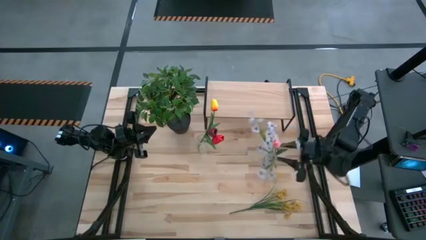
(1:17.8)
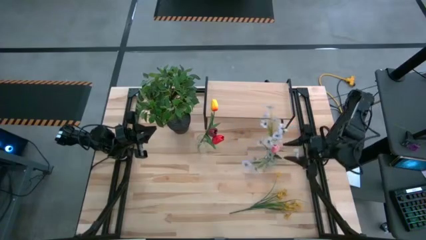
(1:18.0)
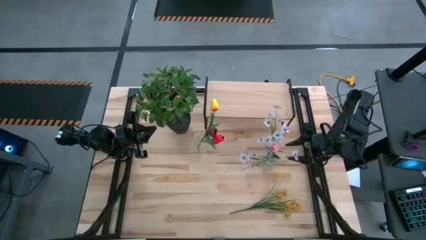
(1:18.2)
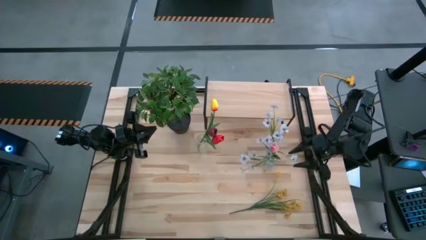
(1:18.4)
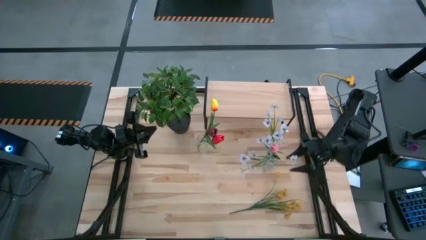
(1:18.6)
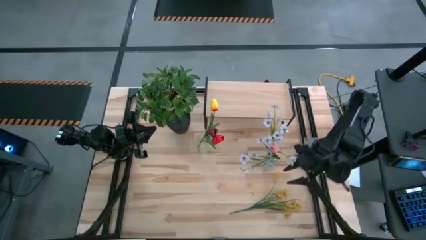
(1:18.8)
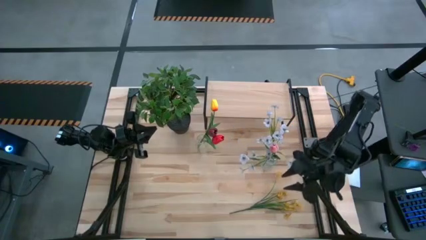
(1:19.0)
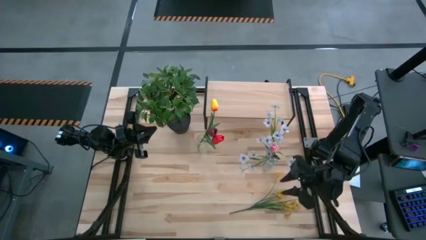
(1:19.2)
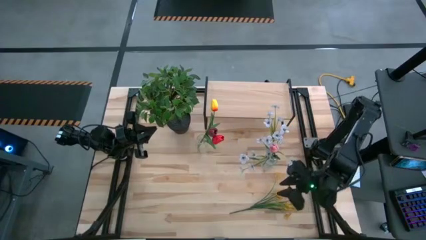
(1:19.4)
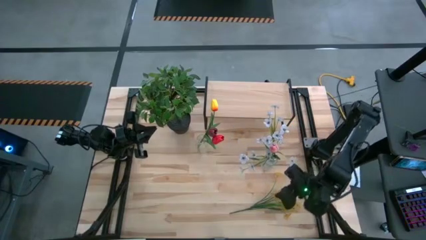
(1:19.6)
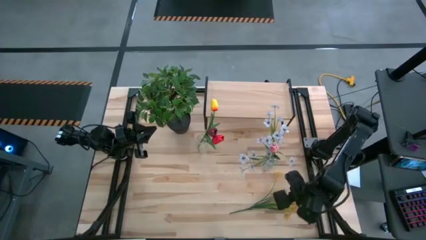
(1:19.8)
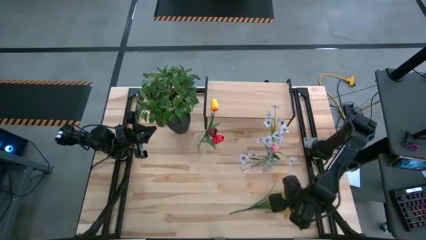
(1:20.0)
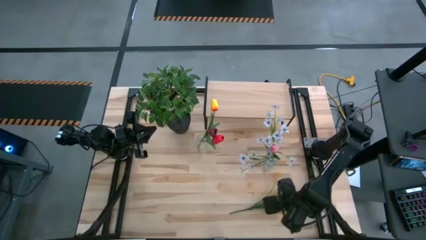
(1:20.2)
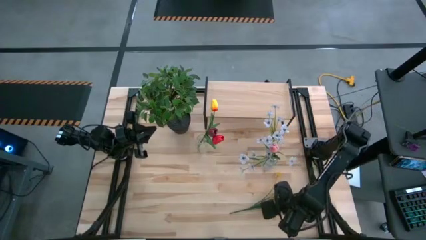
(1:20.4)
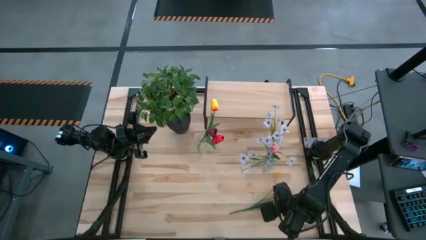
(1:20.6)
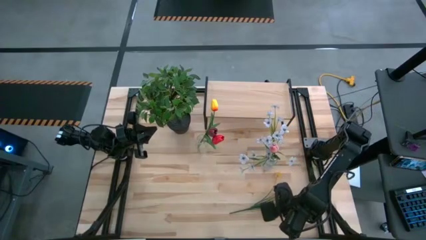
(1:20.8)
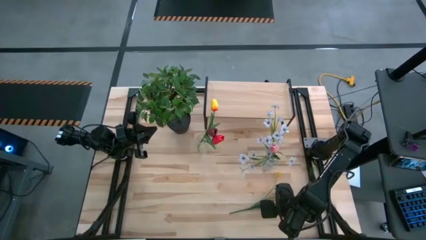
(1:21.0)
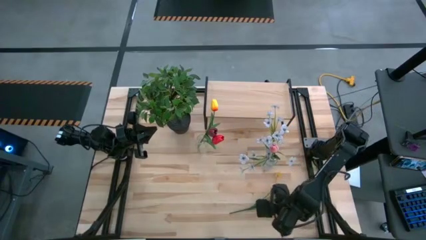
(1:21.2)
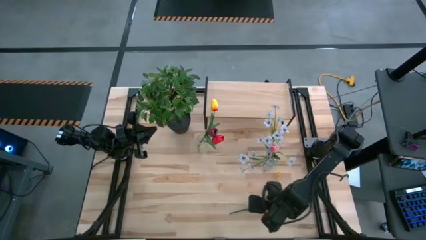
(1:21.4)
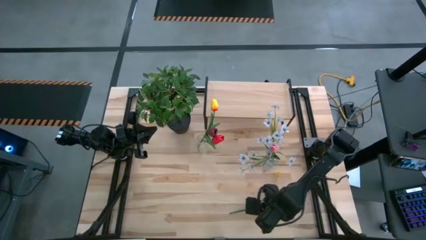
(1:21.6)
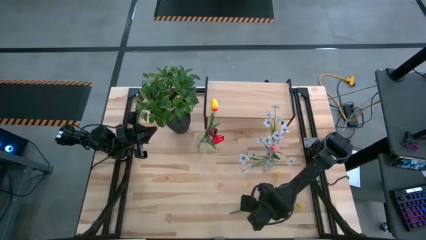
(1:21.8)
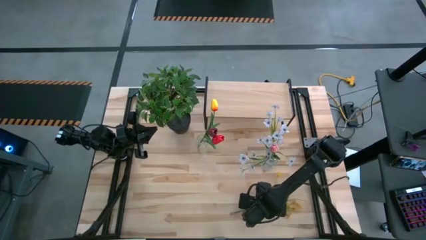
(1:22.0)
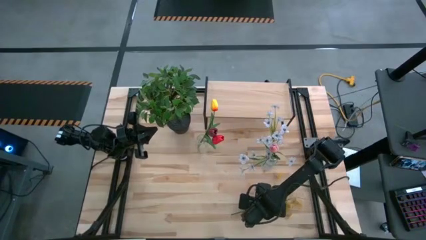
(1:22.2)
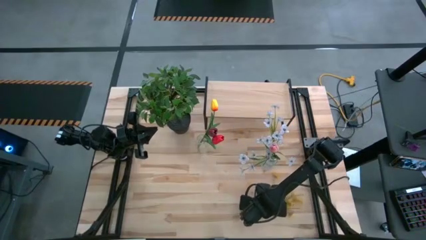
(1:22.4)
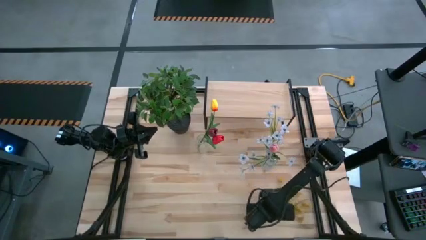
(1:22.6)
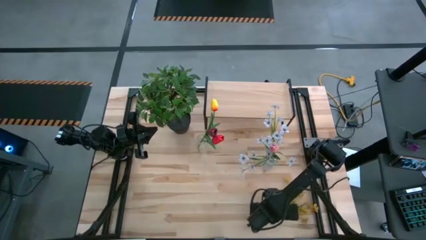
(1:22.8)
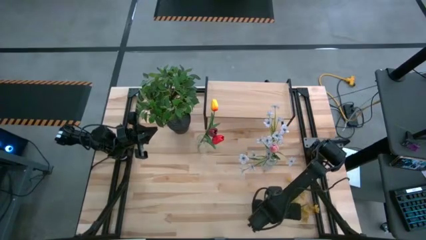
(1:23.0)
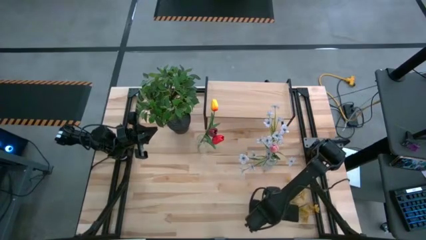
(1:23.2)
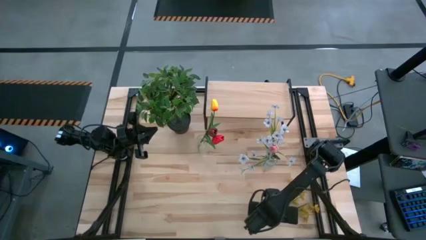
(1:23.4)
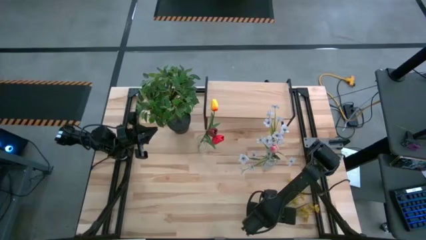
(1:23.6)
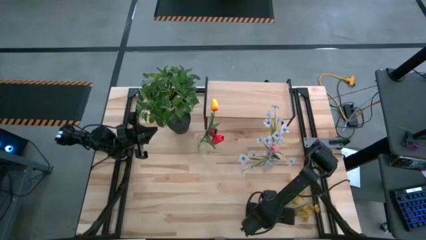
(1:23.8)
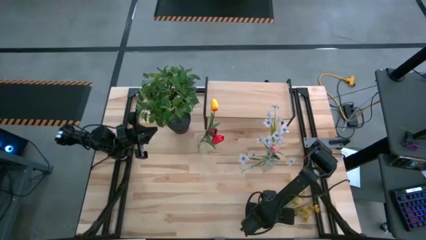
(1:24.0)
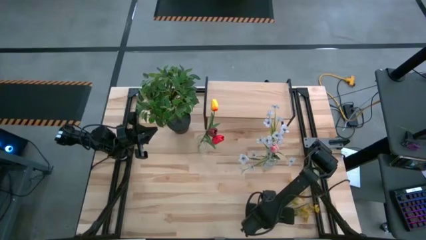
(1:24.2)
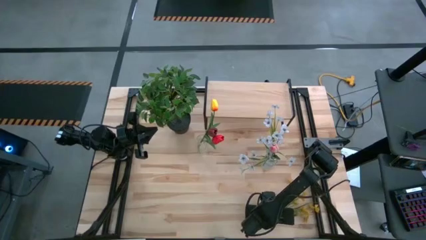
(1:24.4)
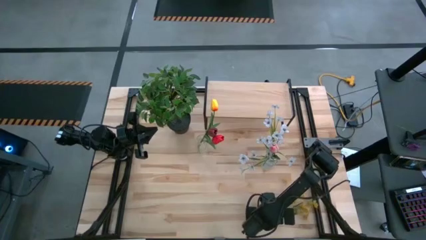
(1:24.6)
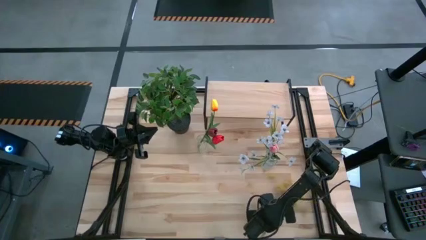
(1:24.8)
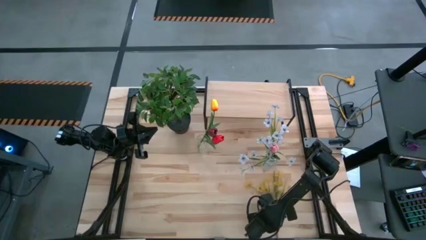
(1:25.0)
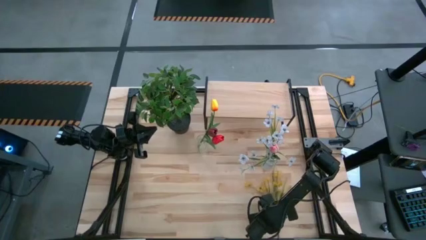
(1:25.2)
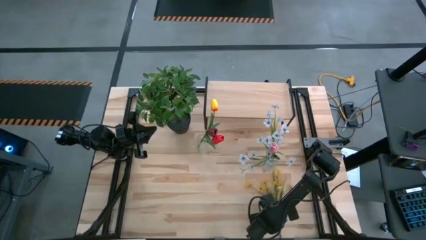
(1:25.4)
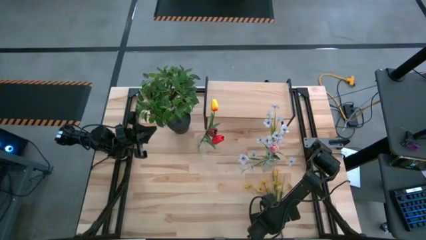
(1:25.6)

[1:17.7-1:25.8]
Task: Pick and place flowers into a vace then onto a shelf
Put the yellow flowers into the right transparent vase

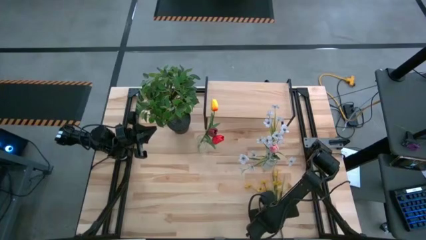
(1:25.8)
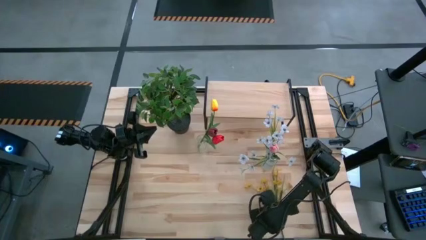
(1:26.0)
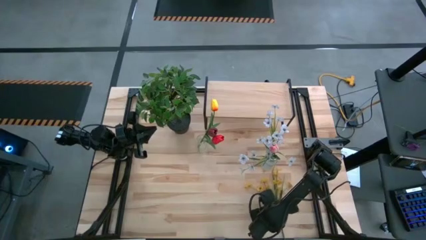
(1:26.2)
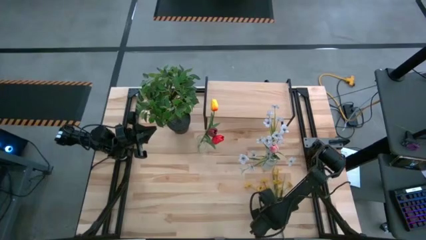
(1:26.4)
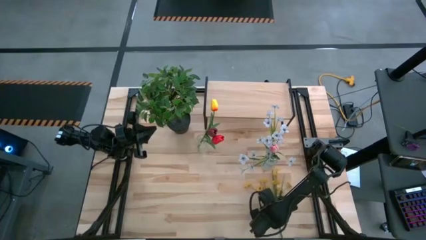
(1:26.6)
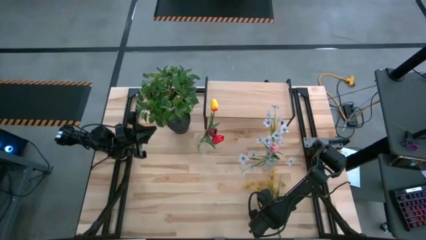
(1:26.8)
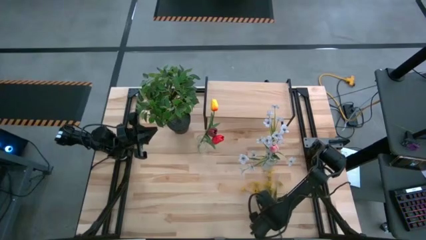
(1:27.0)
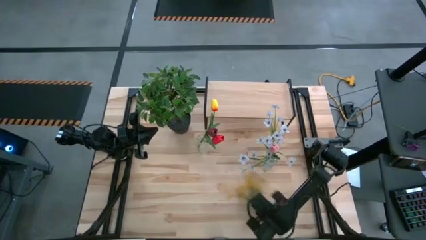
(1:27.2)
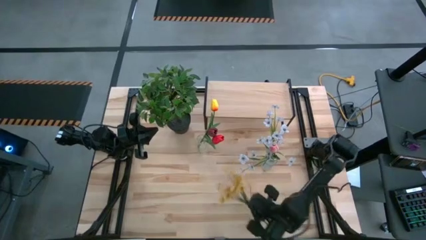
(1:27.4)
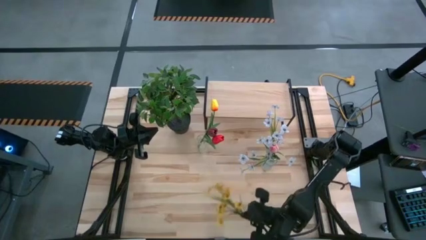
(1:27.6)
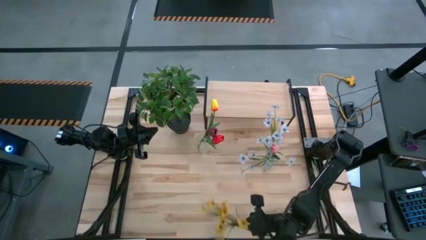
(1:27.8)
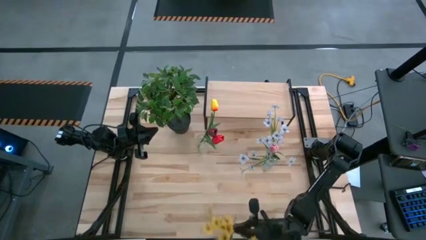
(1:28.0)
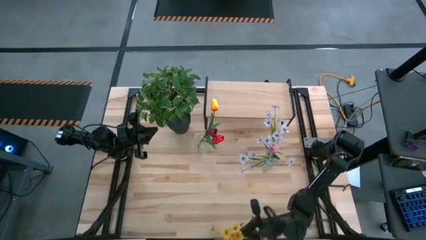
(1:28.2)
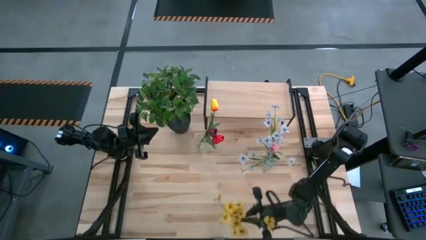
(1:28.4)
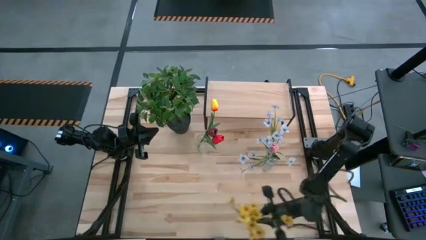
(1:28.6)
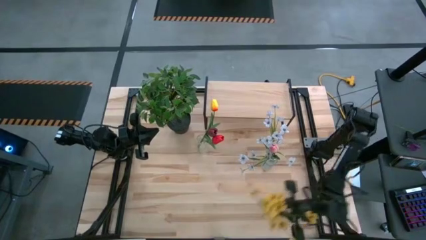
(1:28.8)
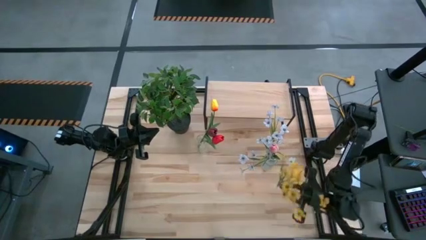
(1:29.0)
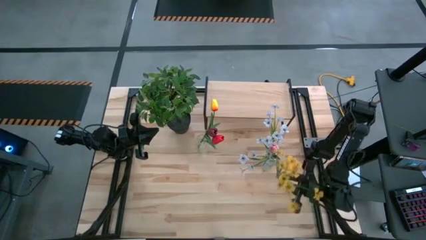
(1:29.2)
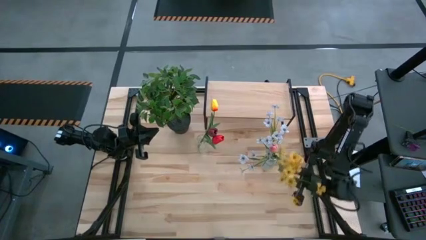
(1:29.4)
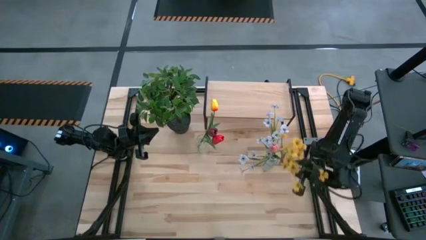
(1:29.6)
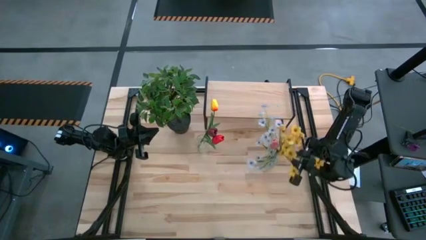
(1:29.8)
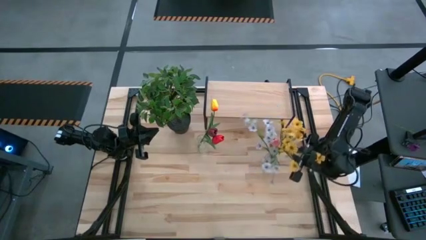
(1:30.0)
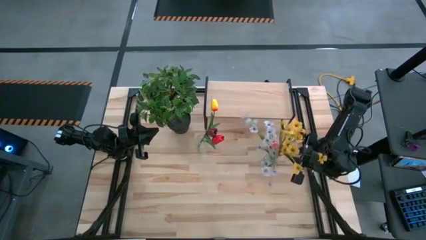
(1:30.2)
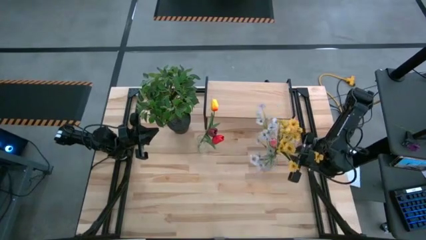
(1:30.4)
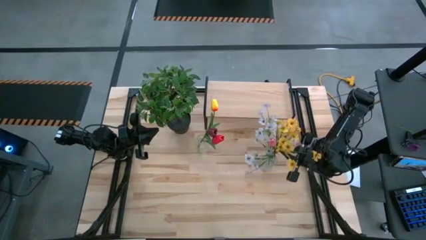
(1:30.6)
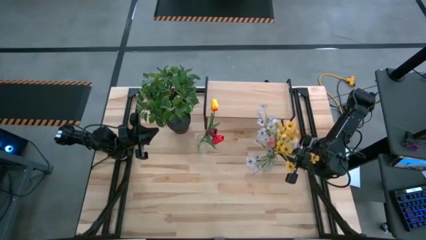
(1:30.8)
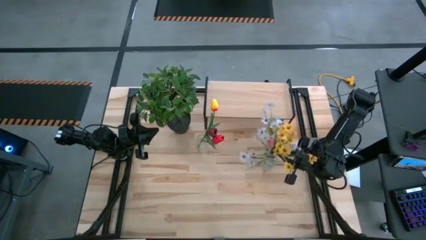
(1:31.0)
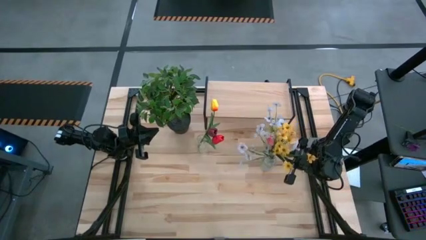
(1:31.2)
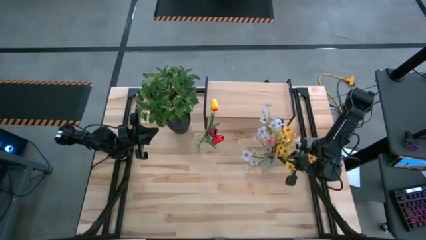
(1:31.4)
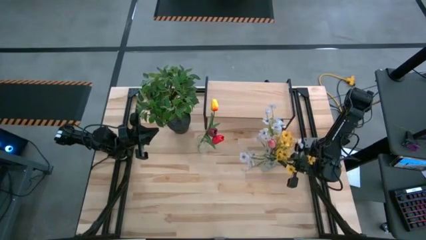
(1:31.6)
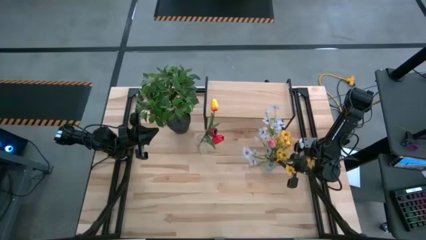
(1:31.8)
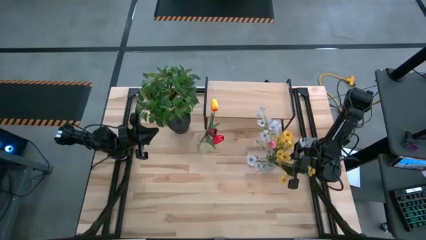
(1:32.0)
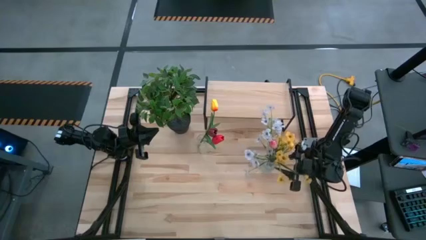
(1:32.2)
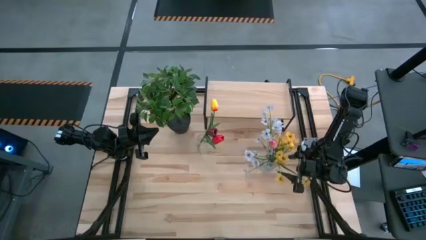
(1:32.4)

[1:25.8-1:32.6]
Put the yellow flowers into the right transparent vase
